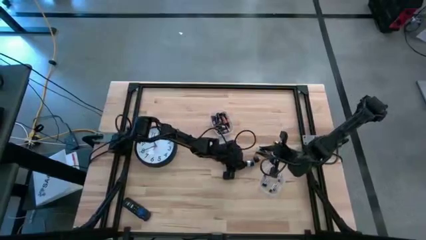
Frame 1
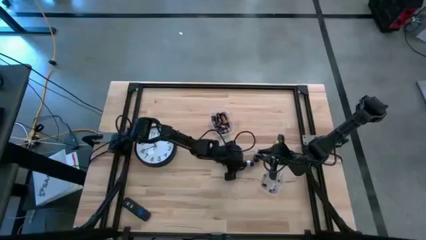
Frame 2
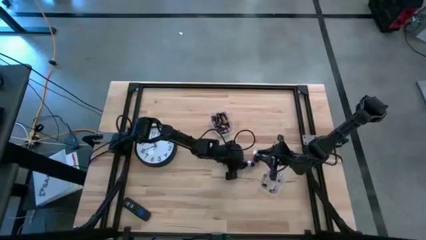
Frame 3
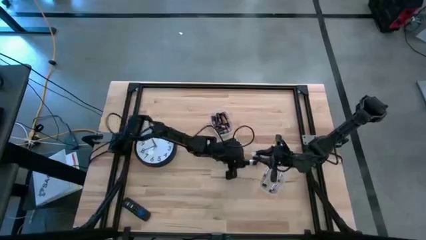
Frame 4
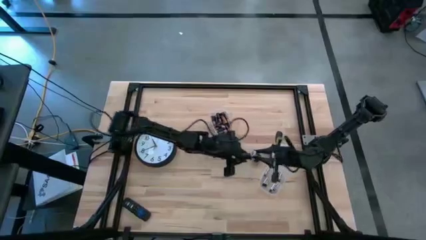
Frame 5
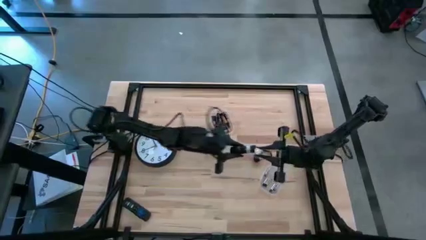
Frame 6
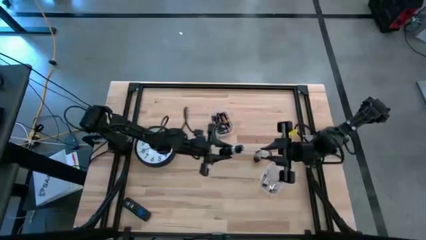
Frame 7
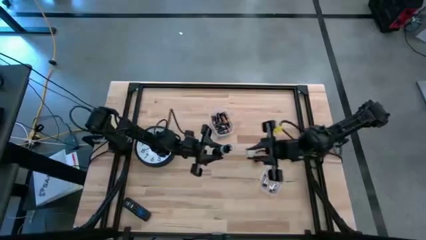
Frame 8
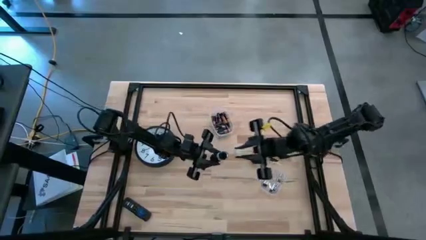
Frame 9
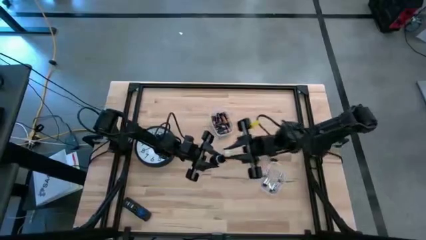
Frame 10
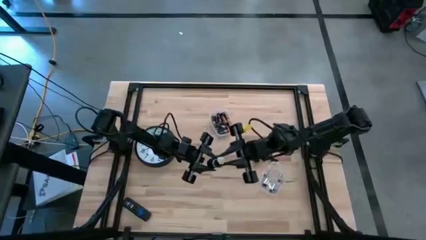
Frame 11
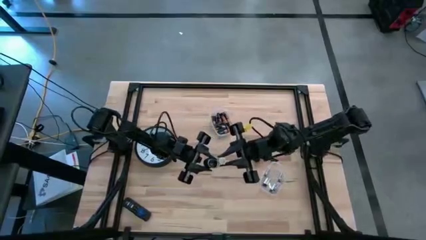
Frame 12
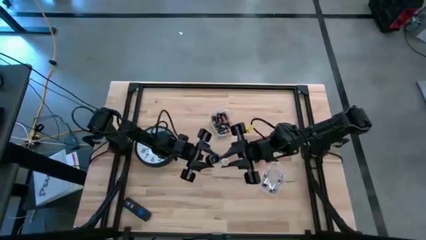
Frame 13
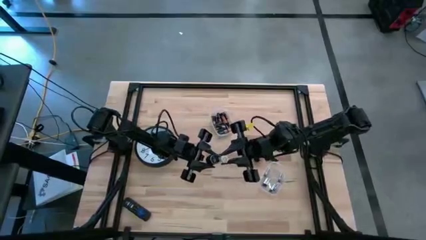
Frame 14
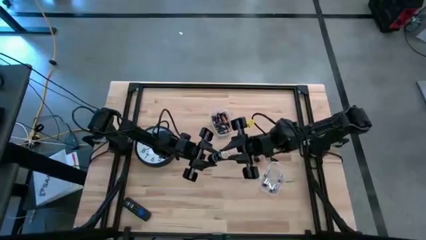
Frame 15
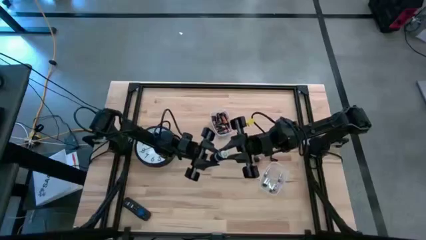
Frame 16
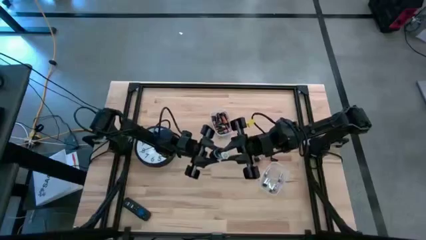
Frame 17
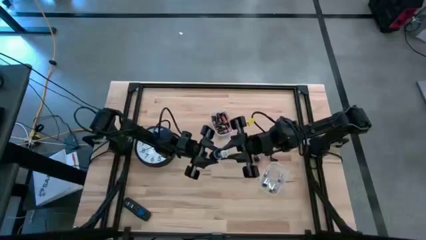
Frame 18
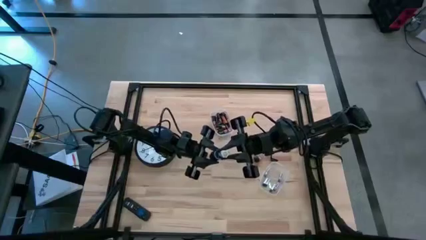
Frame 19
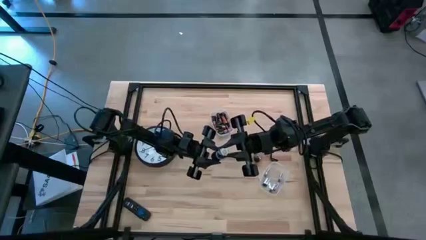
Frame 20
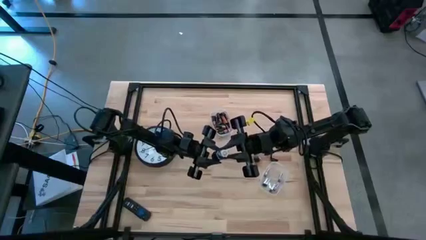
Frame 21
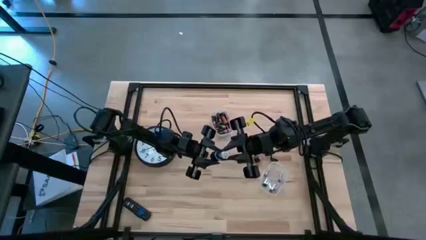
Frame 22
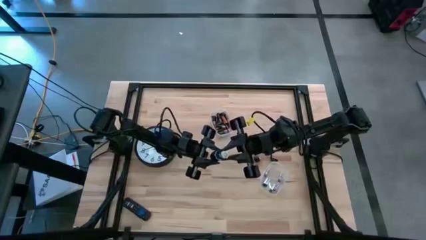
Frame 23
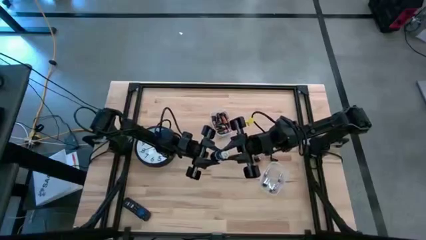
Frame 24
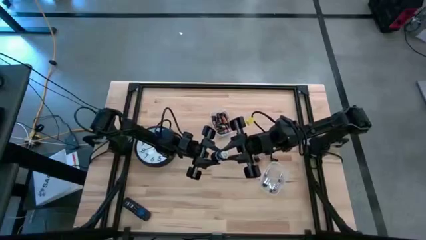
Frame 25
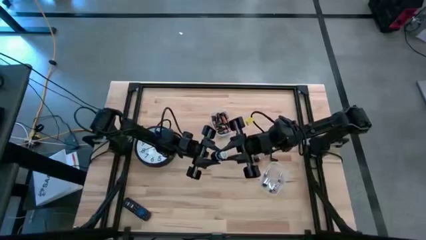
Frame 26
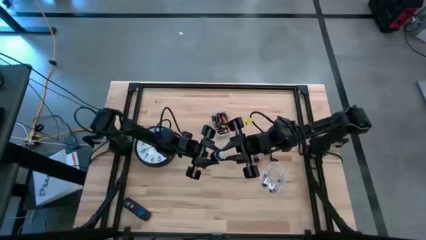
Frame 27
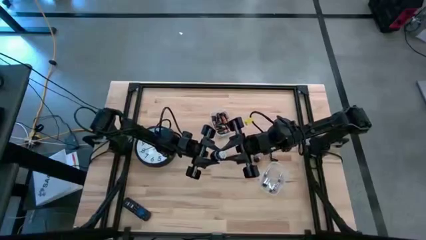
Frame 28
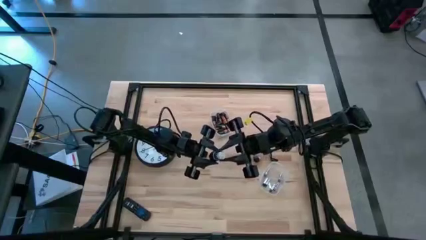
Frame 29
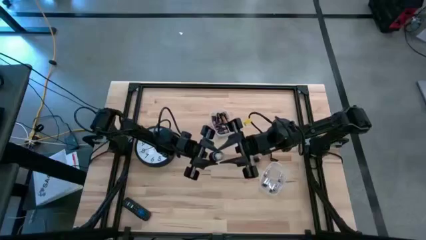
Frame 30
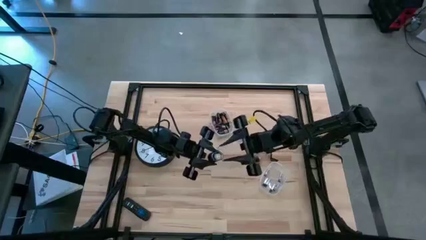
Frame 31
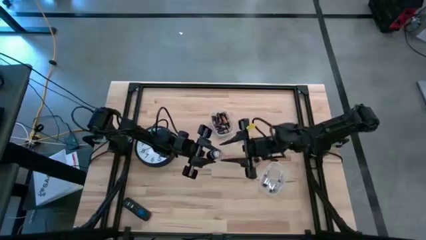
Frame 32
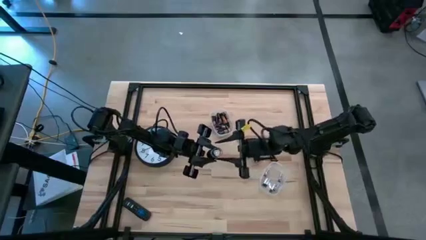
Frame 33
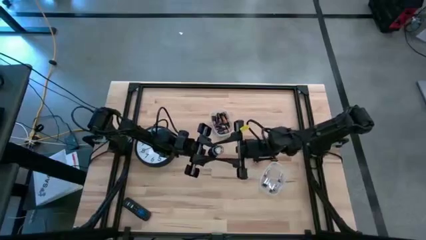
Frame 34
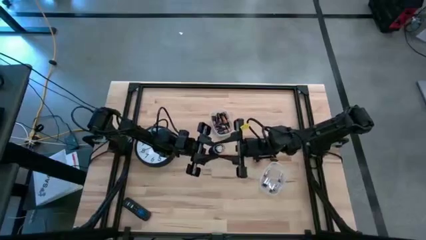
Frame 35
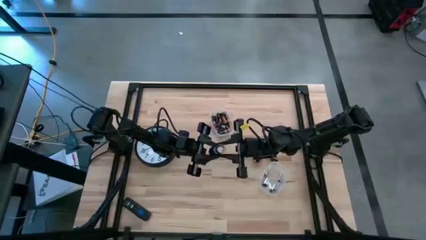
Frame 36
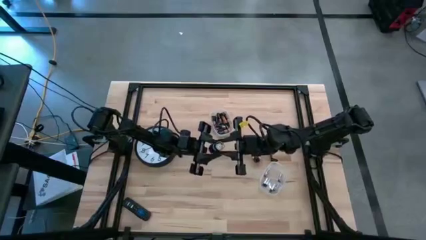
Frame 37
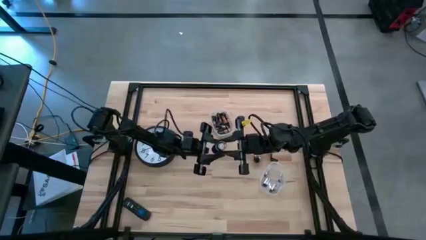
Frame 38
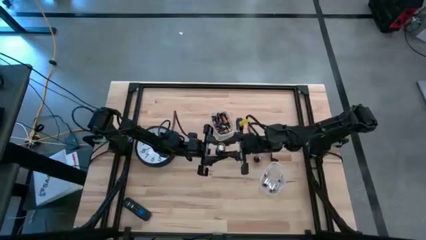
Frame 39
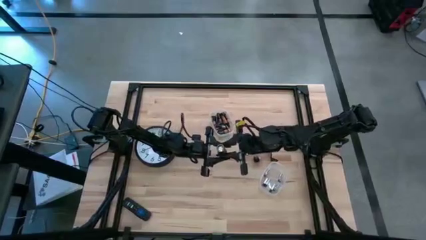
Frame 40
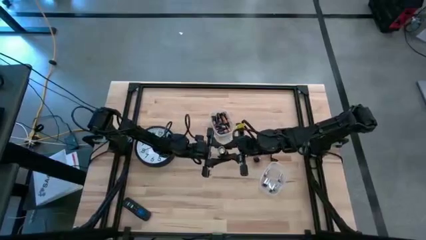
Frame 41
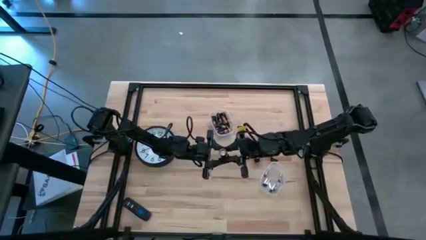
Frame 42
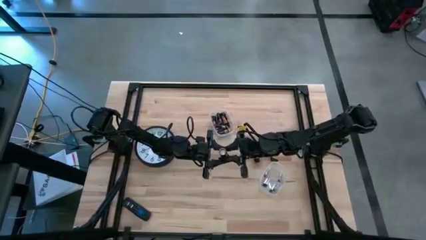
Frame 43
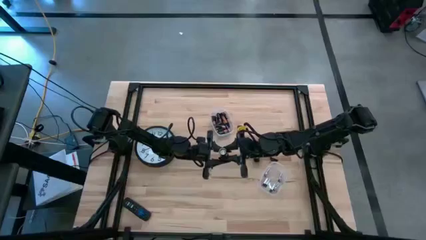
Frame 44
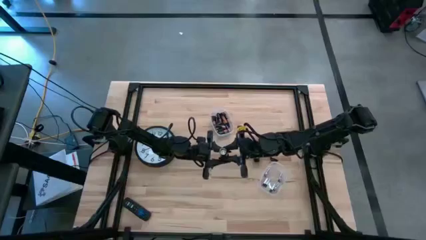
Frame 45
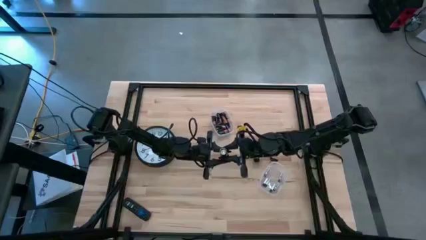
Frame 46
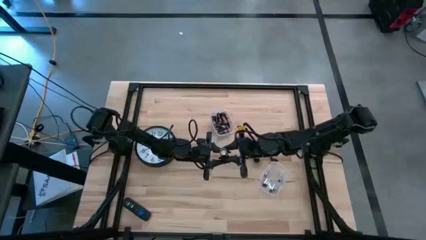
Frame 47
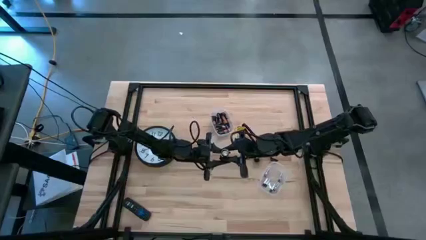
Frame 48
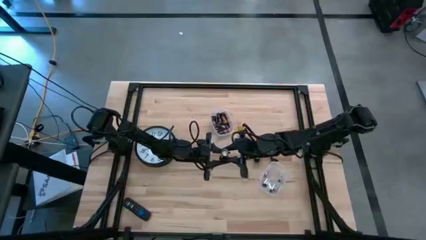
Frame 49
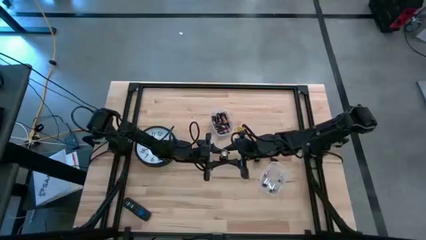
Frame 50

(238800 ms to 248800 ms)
Task: Insert battery
Insert the battery holder into the black flashlight

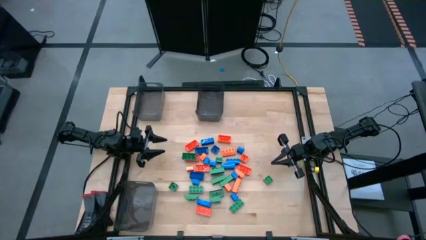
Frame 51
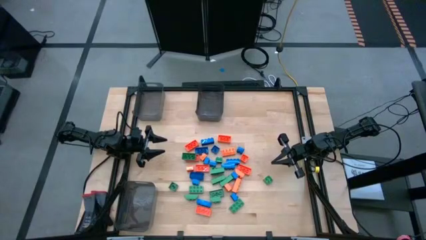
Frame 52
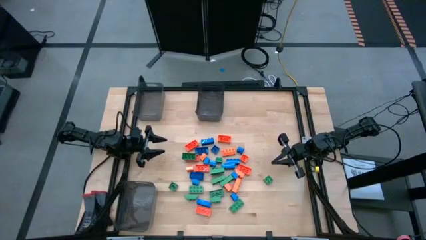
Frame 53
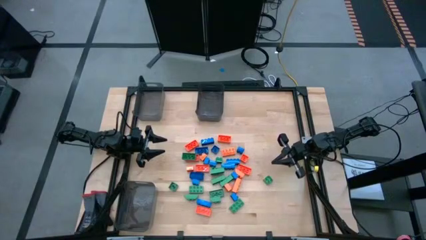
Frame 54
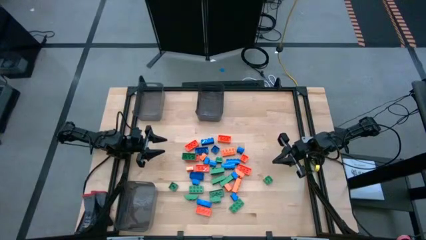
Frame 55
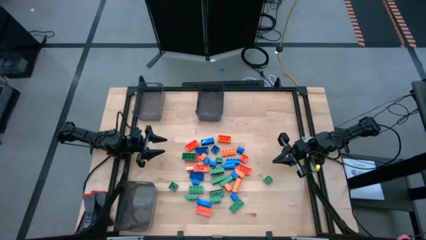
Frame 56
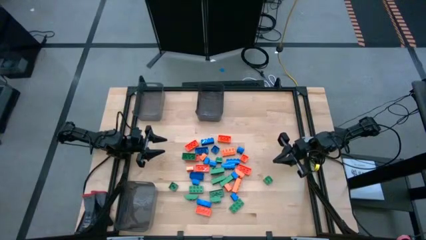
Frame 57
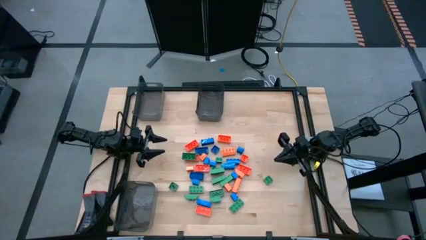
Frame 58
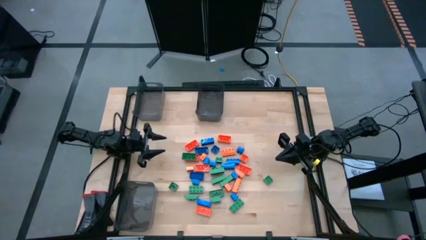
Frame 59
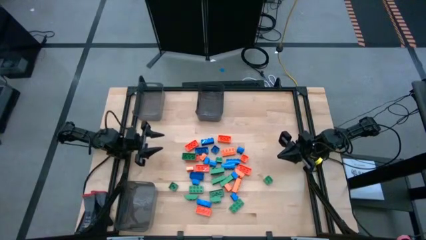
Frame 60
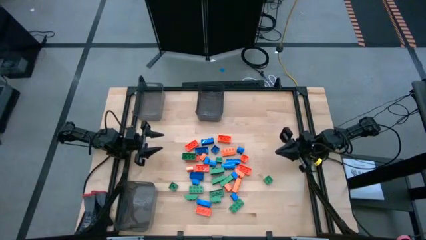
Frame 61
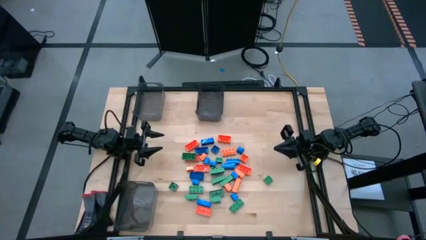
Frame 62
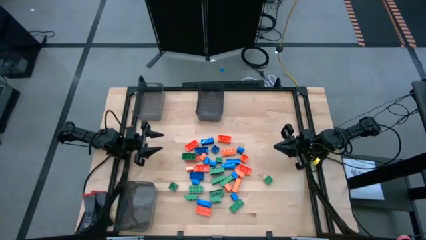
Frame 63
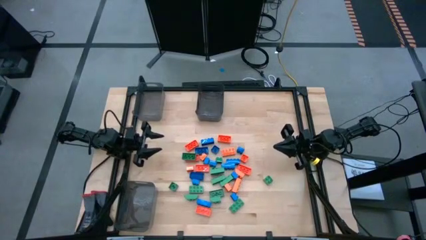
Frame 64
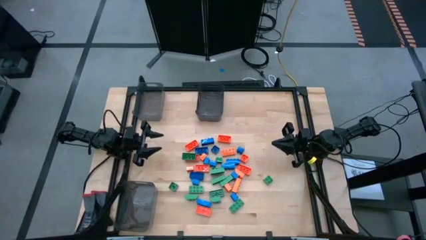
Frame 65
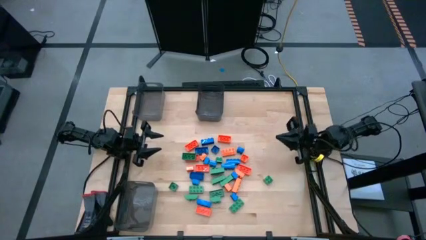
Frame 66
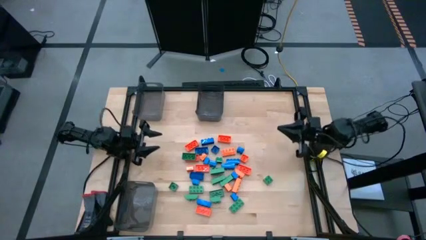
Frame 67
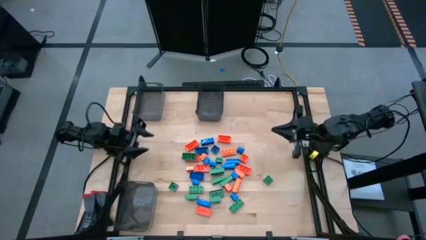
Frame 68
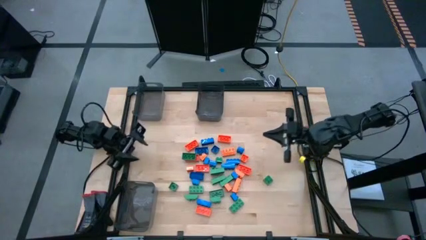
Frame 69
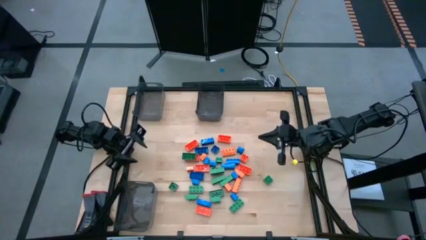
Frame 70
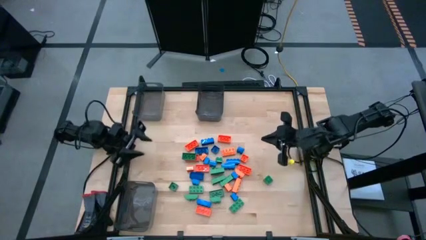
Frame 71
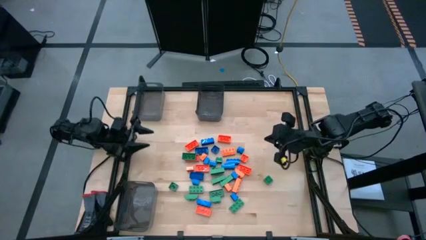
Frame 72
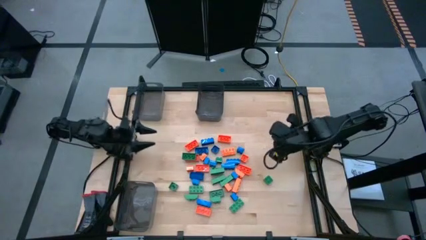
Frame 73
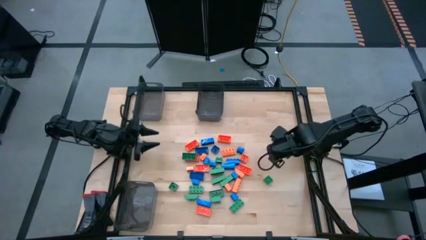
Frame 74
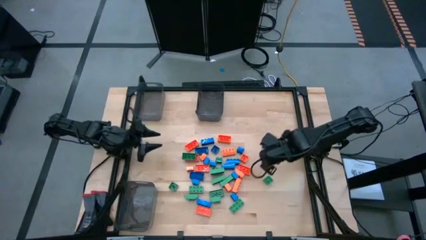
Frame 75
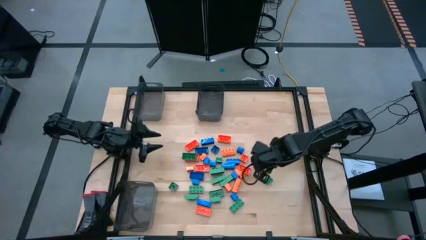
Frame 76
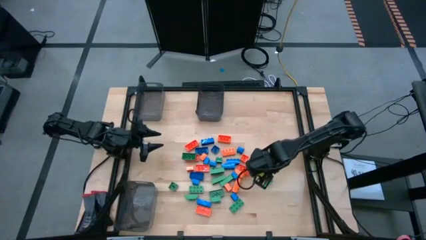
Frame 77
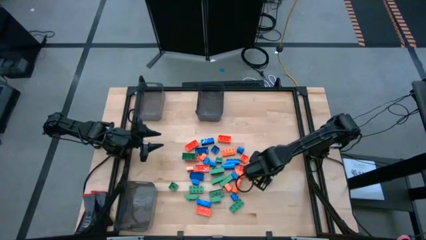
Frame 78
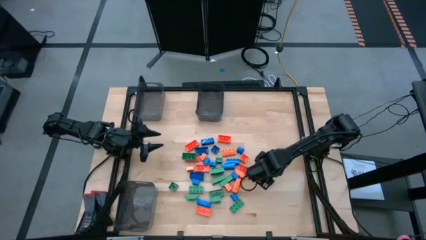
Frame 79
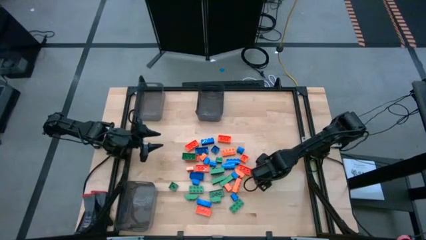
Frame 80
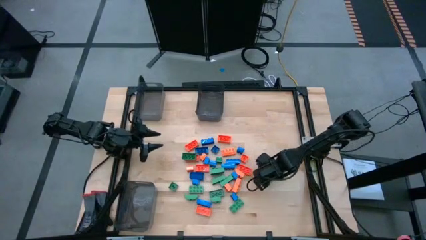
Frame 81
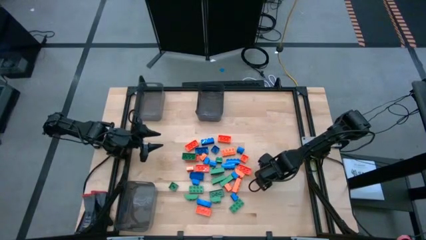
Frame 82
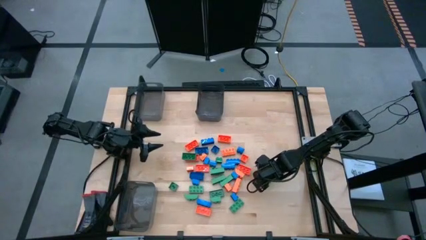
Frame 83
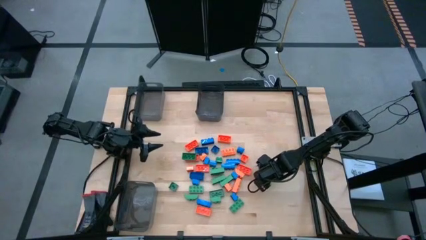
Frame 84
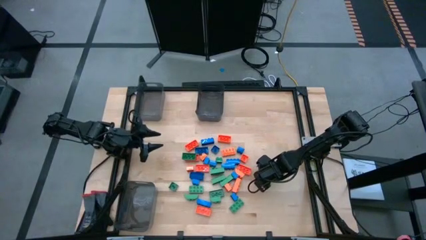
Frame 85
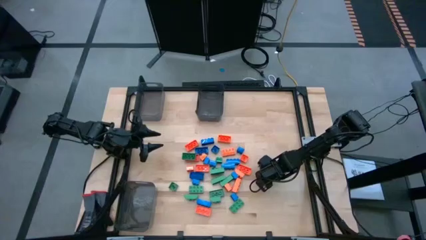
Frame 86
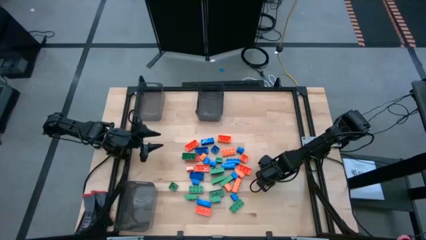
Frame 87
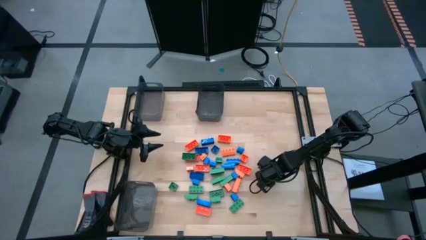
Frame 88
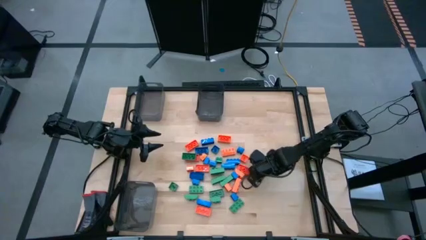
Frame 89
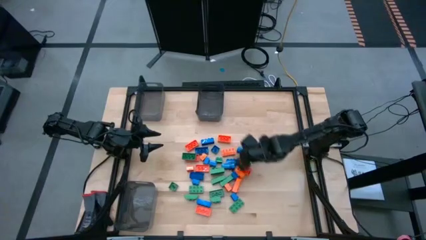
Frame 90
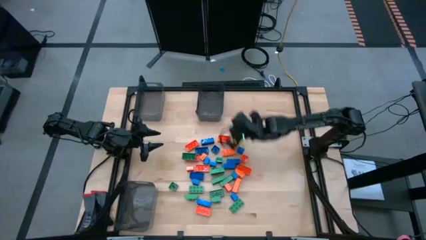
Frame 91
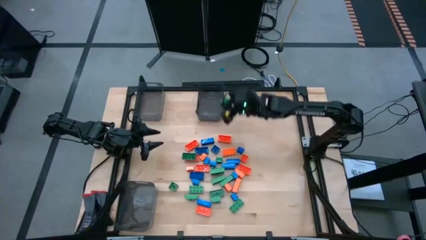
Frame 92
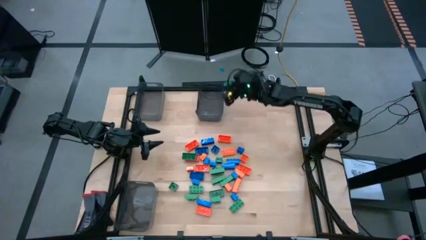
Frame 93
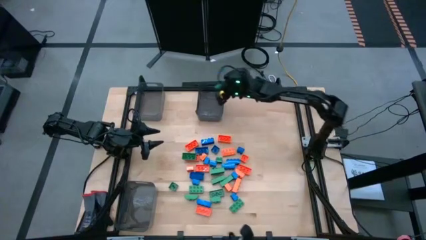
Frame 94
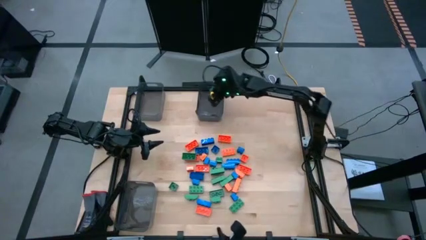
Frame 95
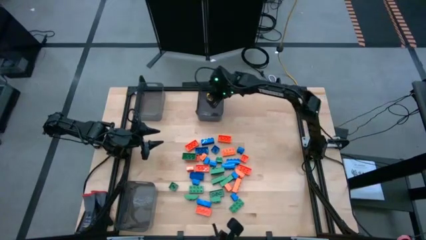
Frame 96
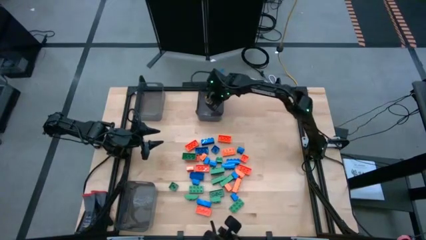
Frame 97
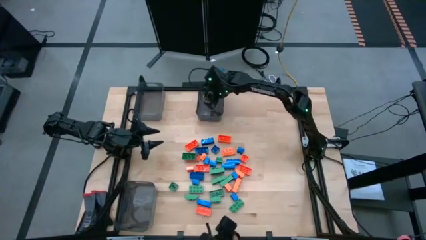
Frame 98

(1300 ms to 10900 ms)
Task: Sort blocks
Put the green game piece into the top right black transparent bin
